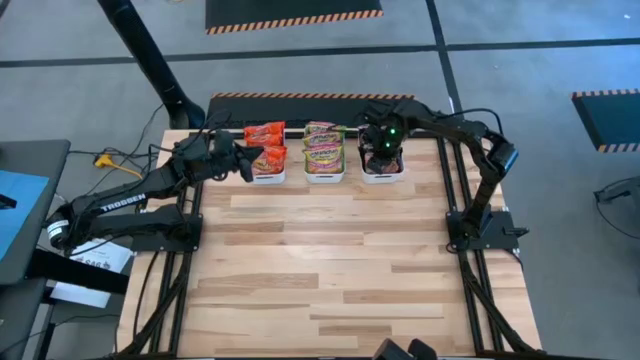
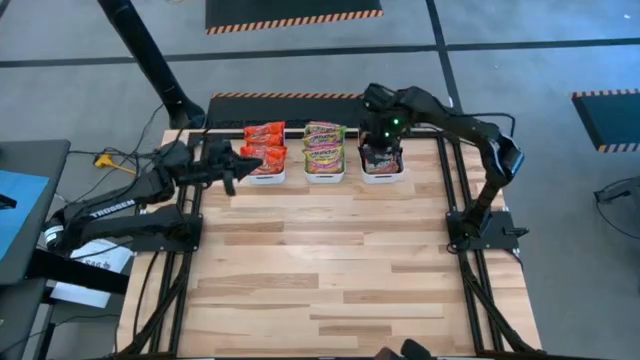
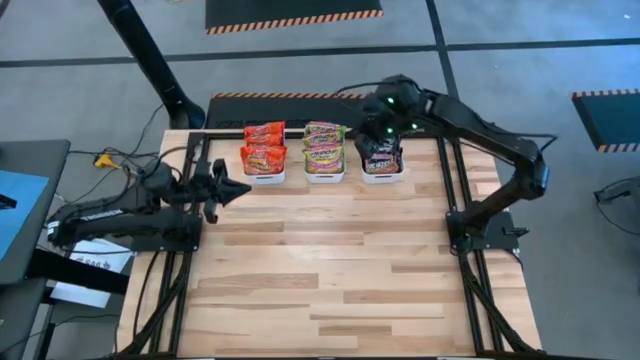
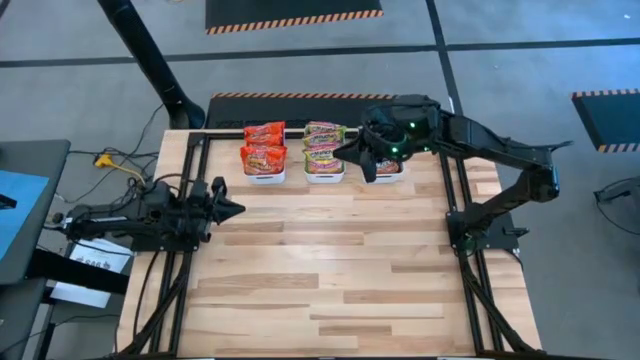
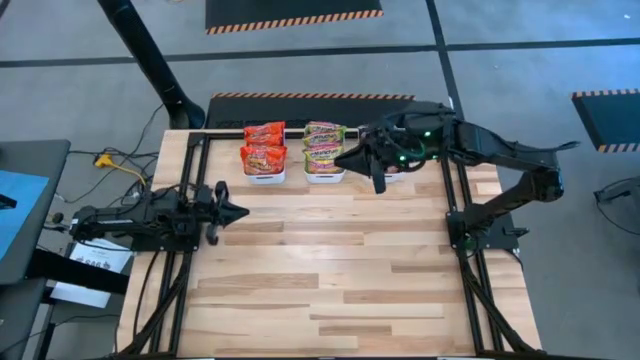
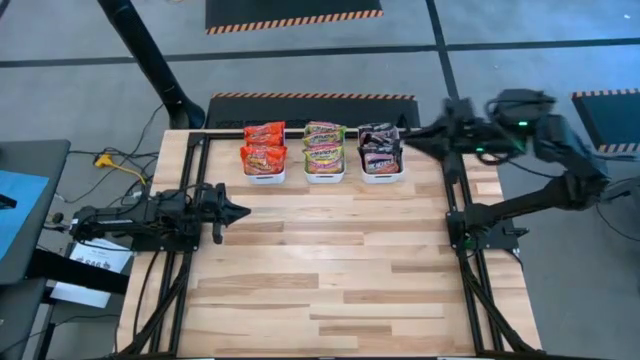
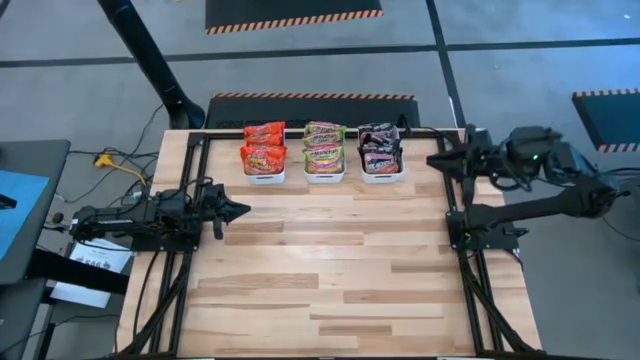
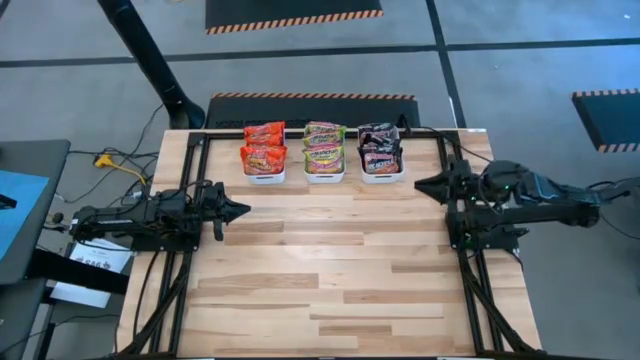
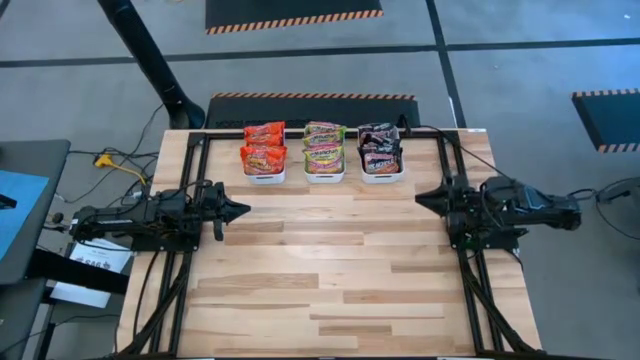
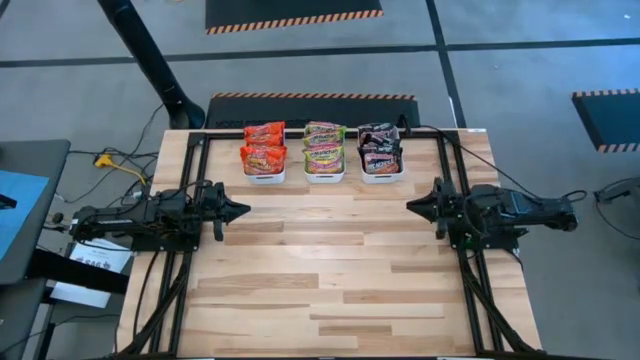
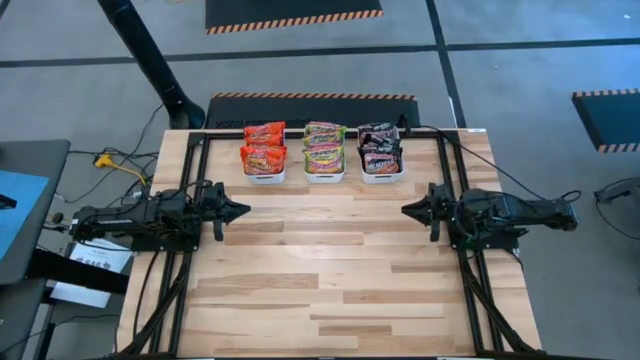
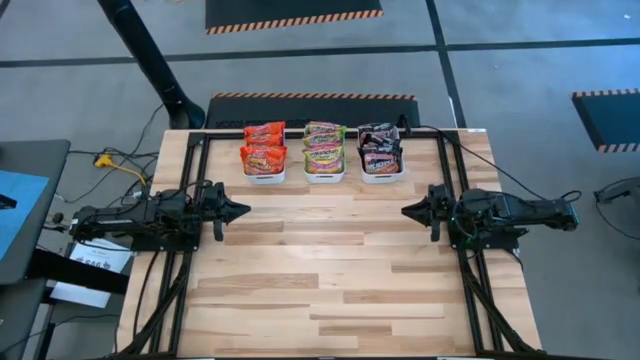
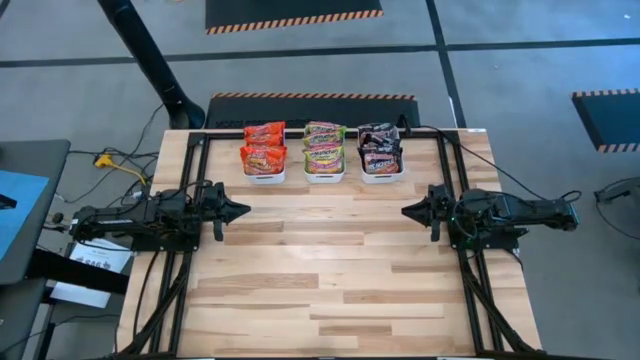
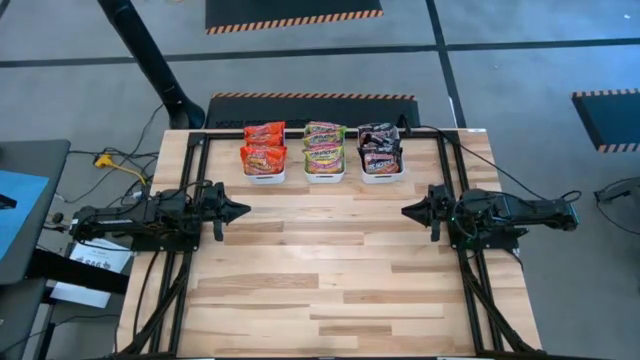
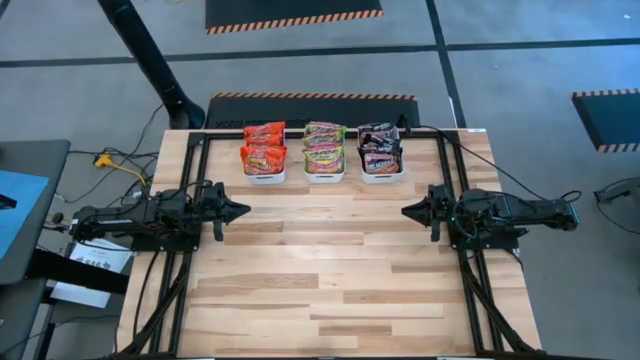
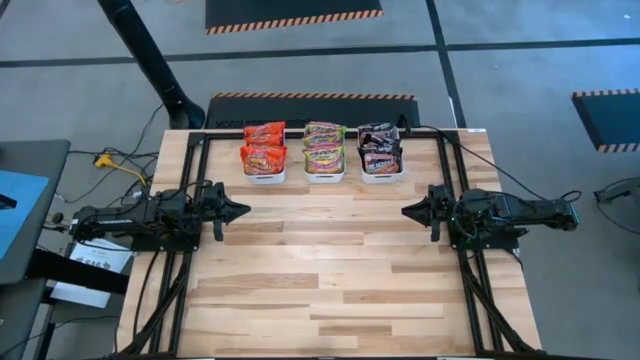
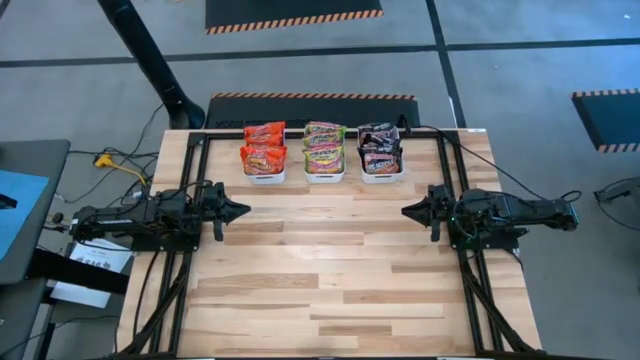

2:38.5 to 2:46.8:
Task: Sort Maruchan noodles
Return to Home Position
